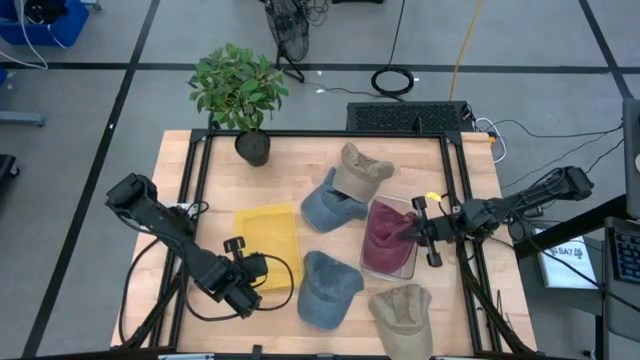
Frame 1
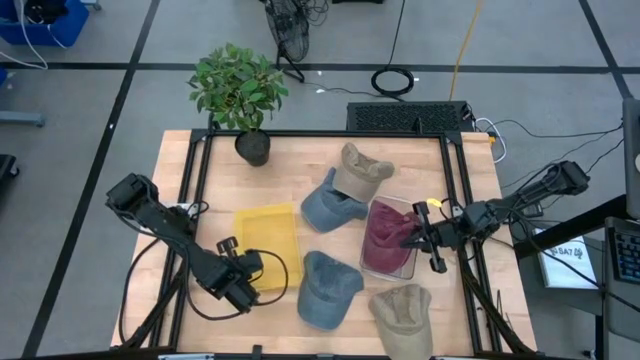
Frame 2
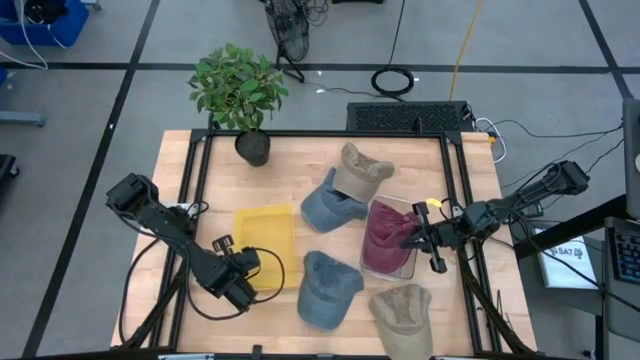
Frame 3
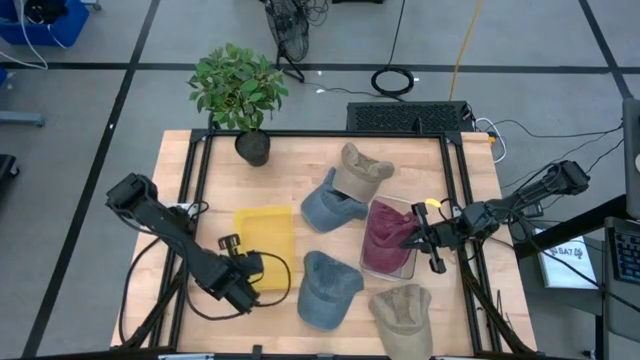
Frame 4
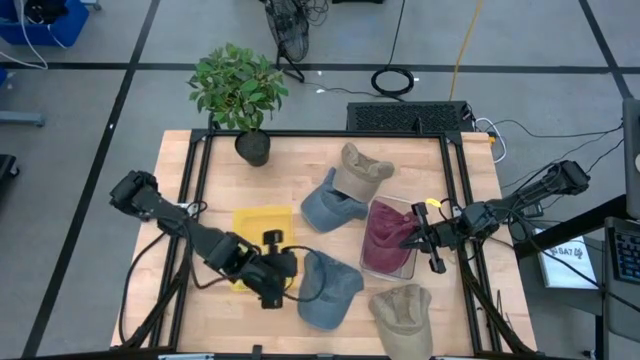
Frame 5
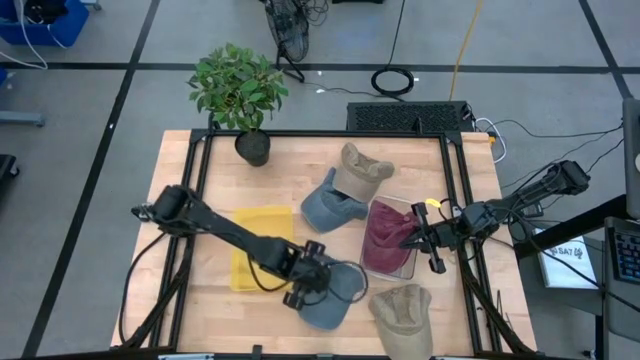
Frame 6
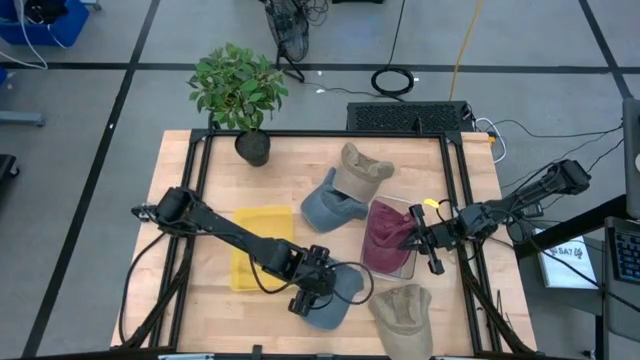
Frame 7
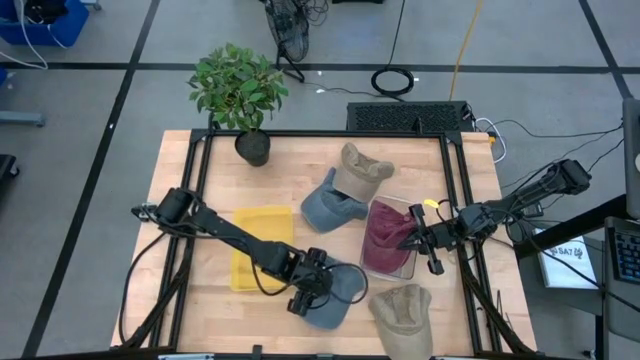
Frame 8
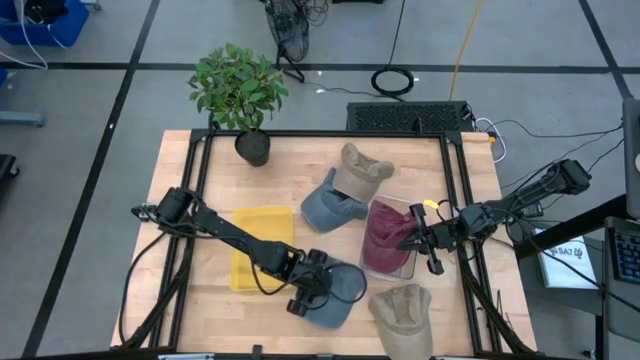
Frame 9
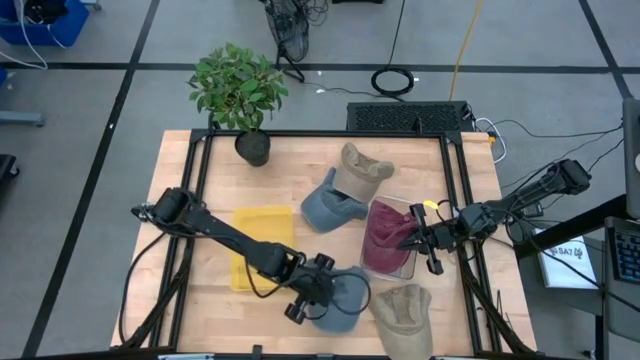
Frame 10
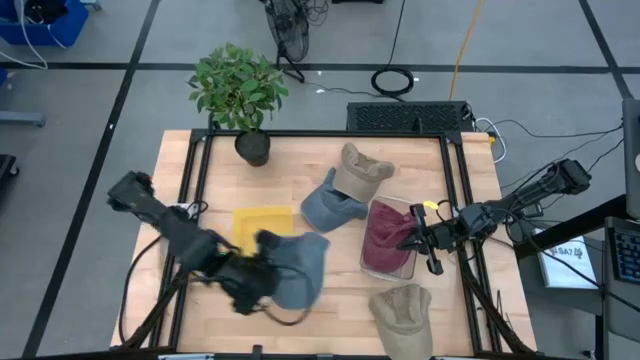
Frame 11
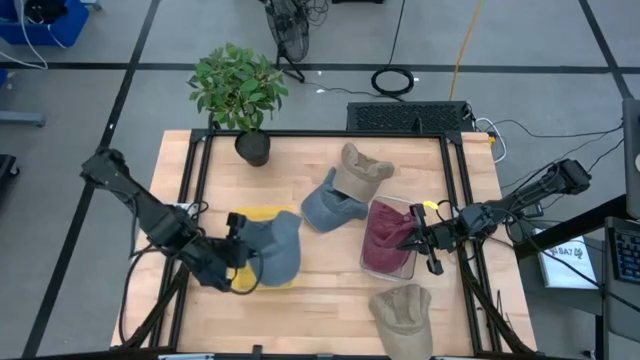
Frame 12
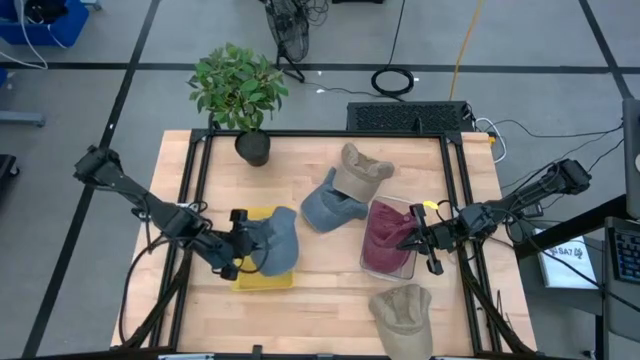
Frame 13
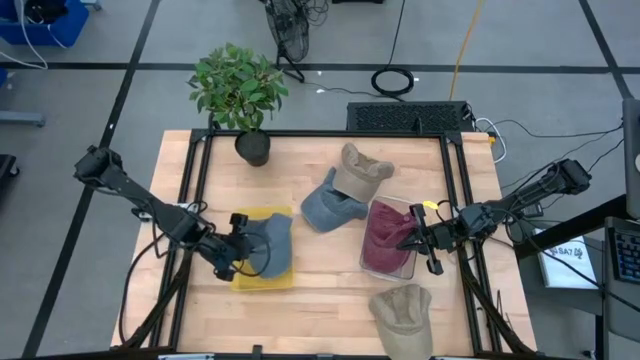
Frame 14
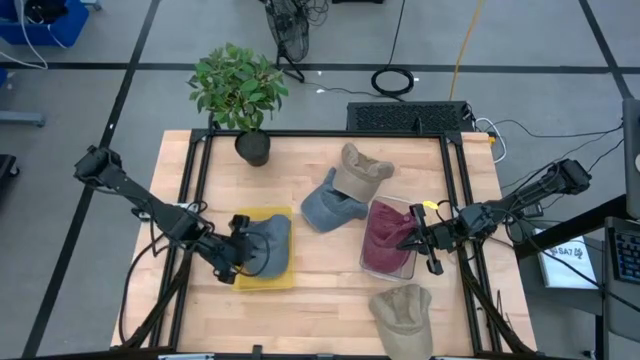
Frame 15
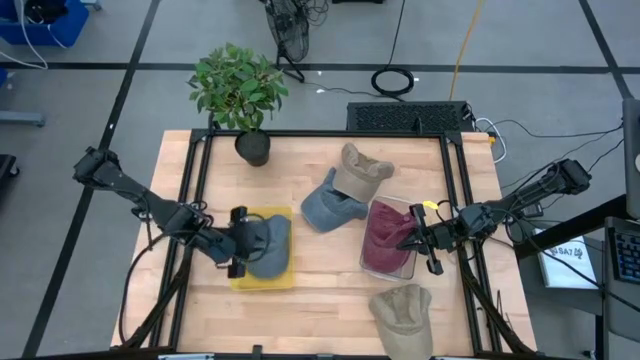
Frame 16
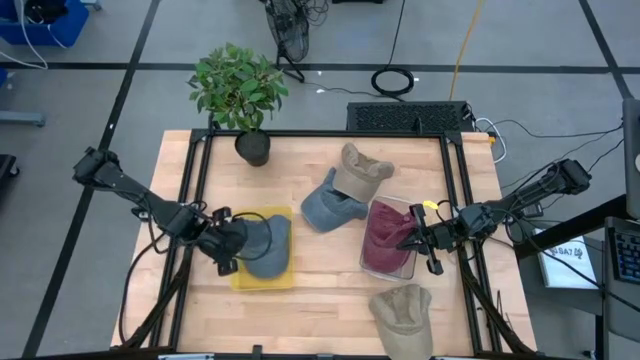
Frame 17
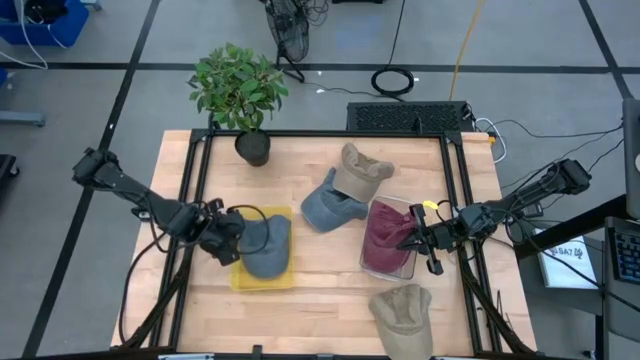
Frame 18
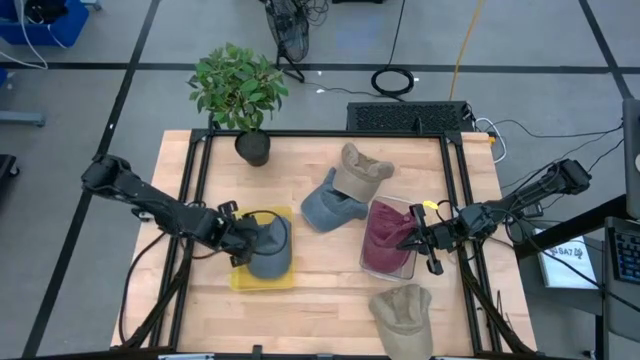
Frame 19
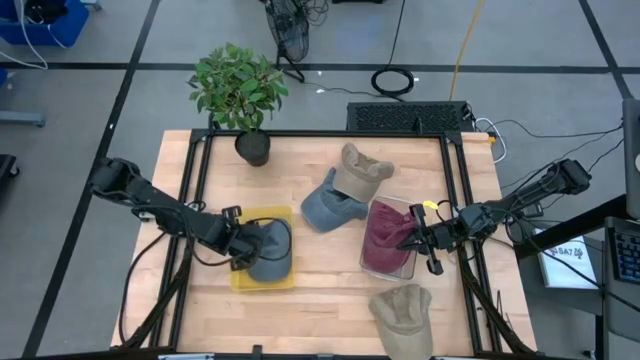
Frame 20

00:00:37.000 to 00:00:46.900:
Task: Pick and place caps into container
Put the bottom blue cap into the yellow container

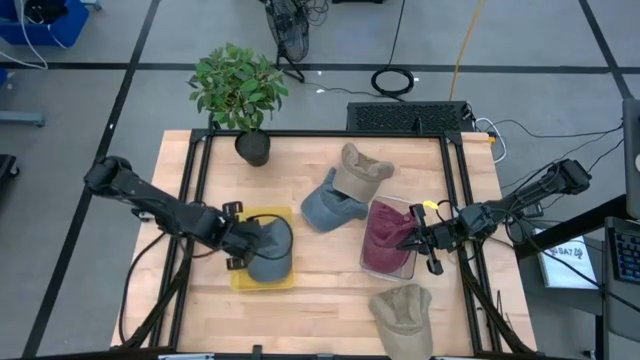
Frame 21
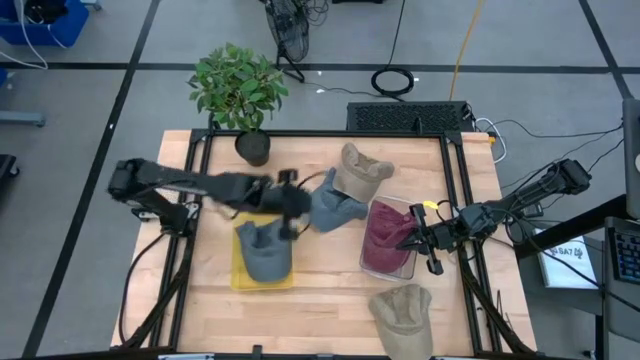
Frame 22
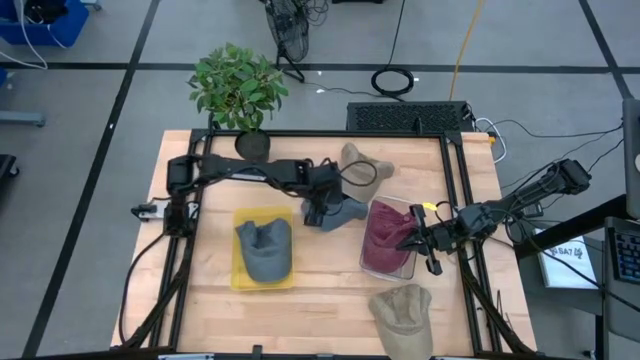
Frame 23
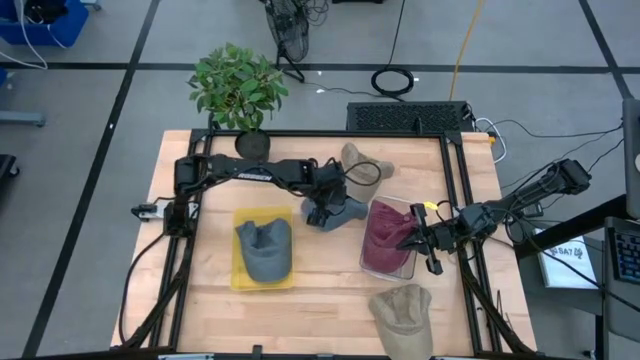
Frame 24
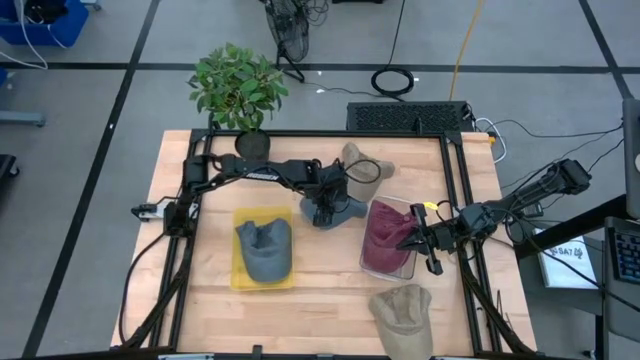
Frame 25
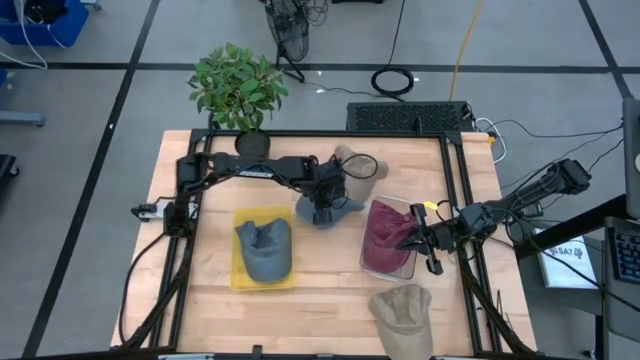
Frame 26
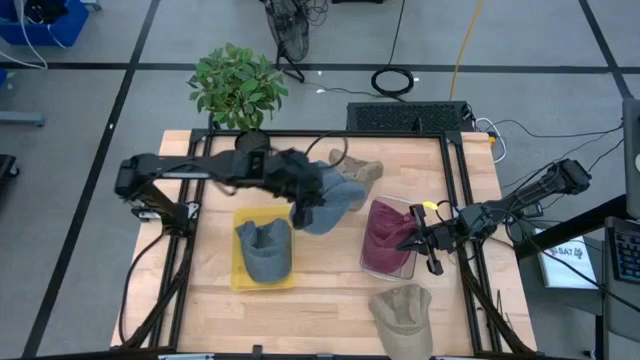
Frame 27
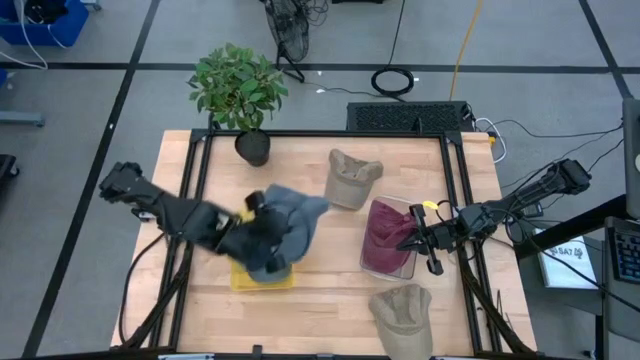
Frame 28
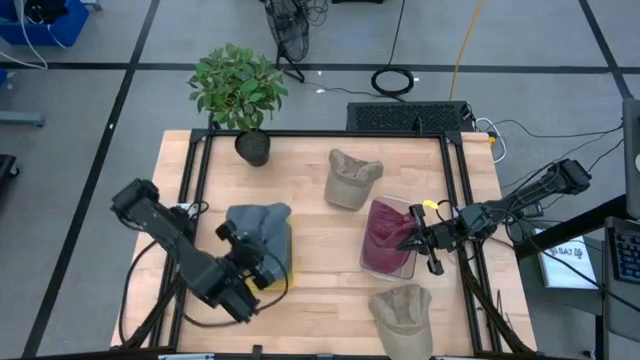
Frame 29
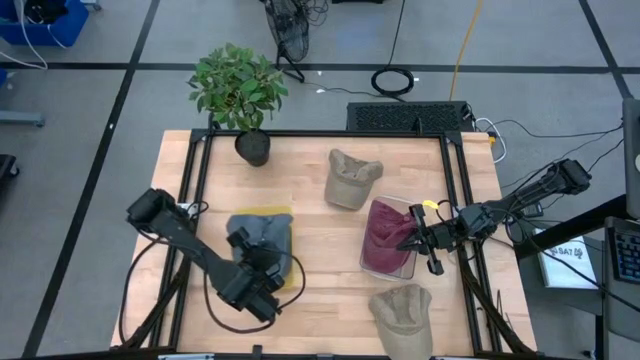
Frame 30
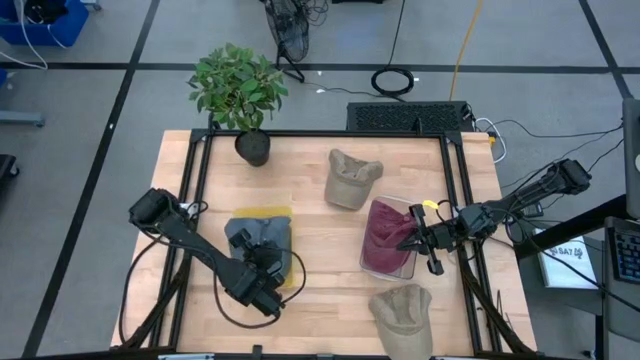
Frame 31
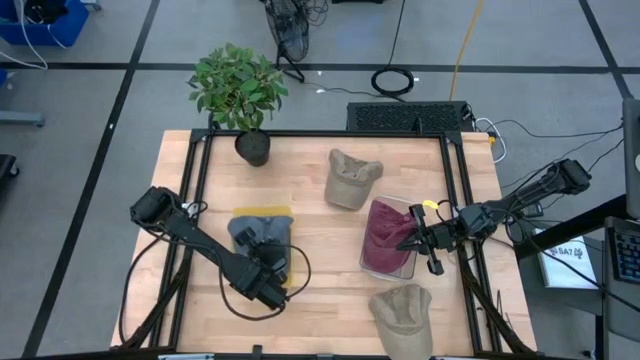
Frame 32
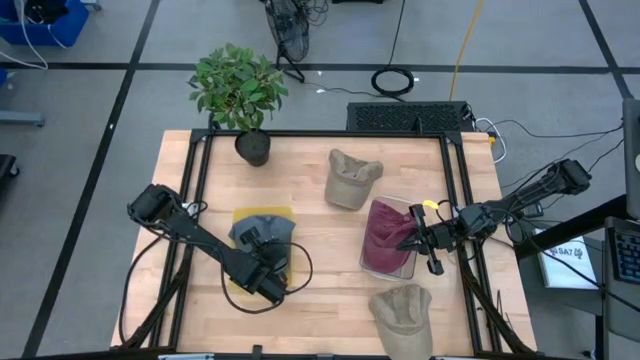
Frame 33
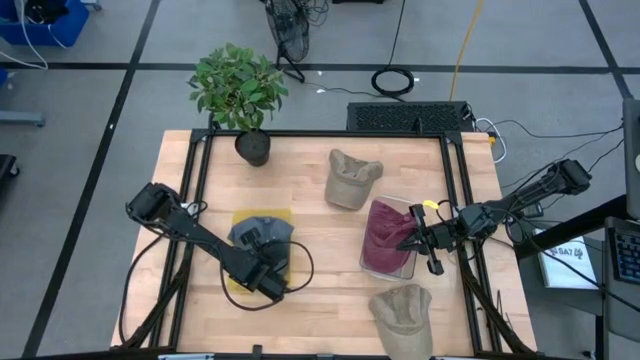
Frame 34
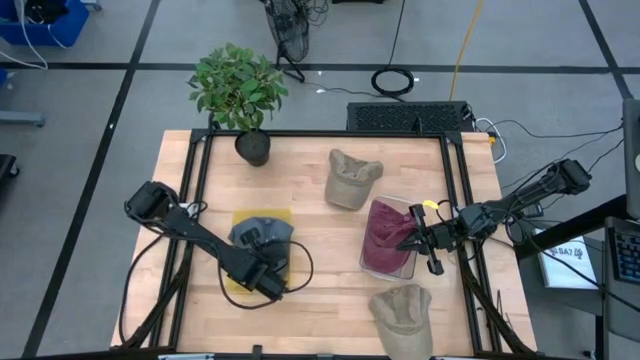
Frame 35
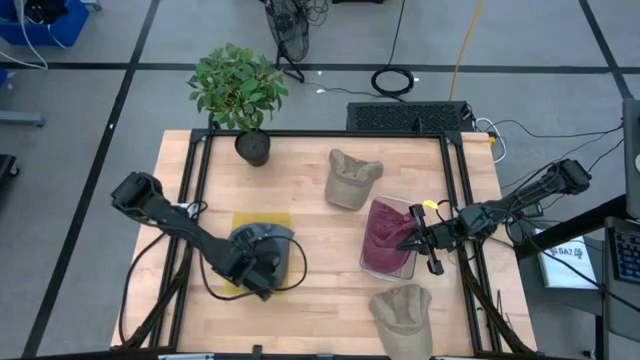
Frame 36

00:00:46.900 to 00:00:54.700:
Put the blue cap into the yellow container

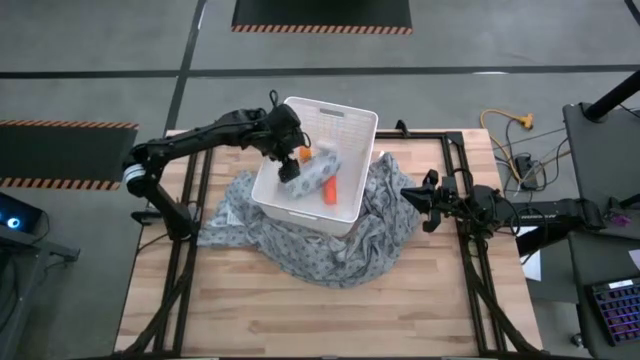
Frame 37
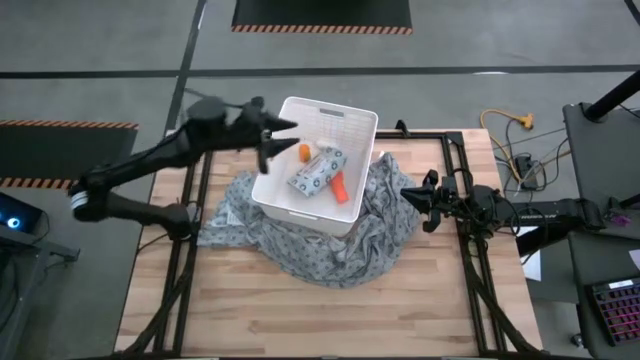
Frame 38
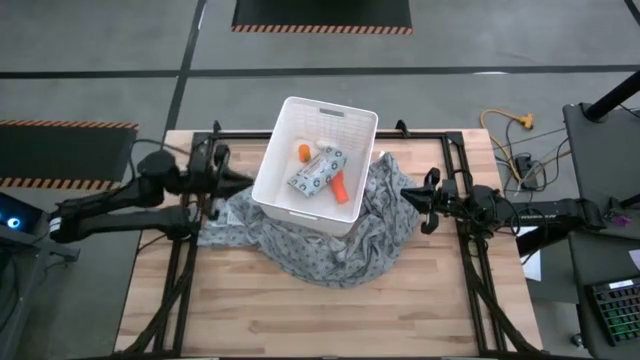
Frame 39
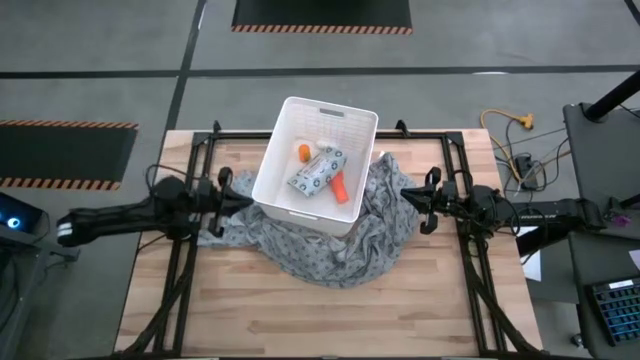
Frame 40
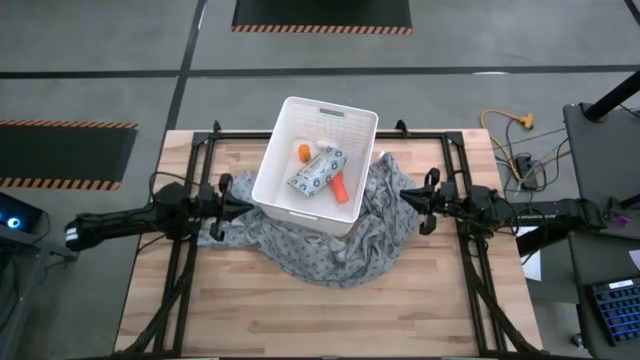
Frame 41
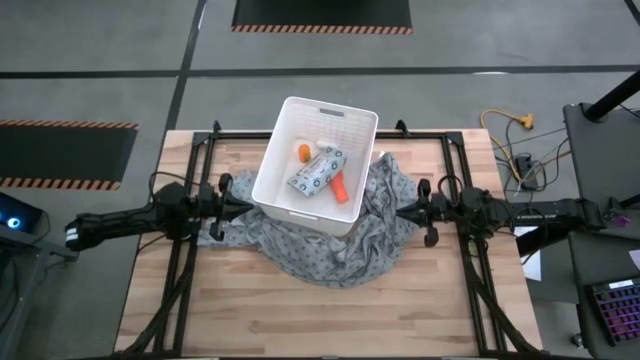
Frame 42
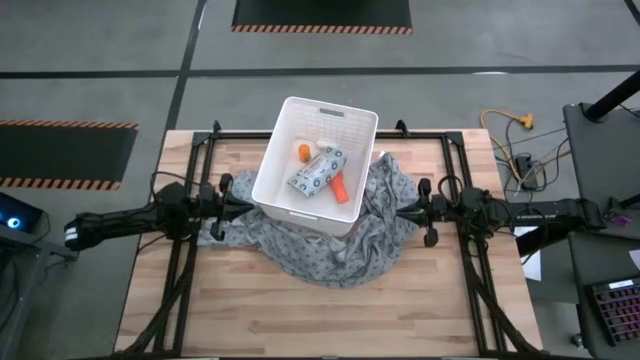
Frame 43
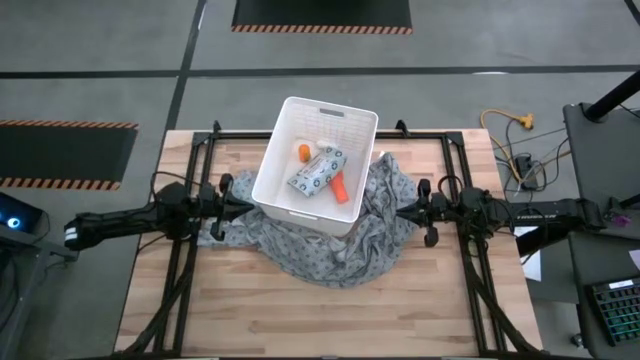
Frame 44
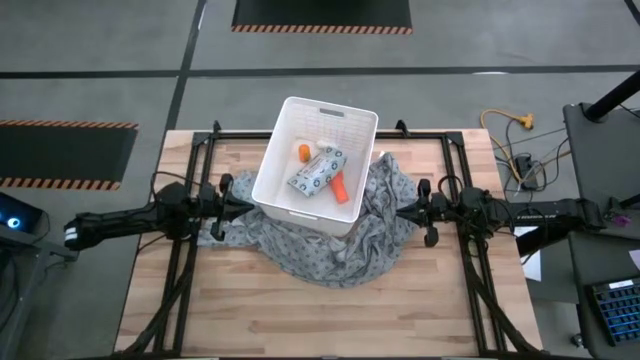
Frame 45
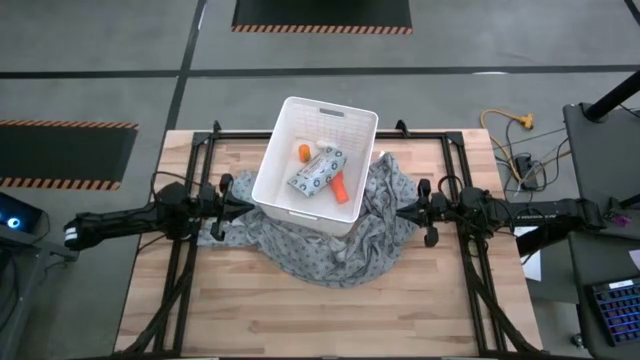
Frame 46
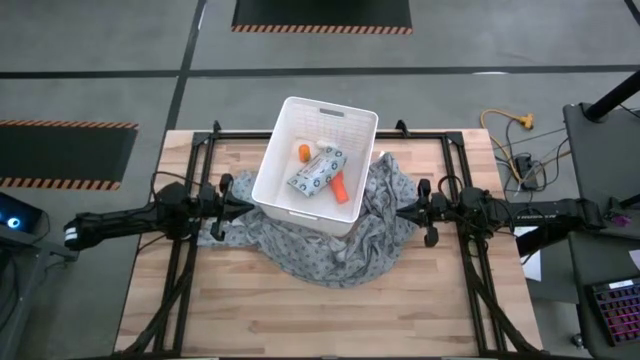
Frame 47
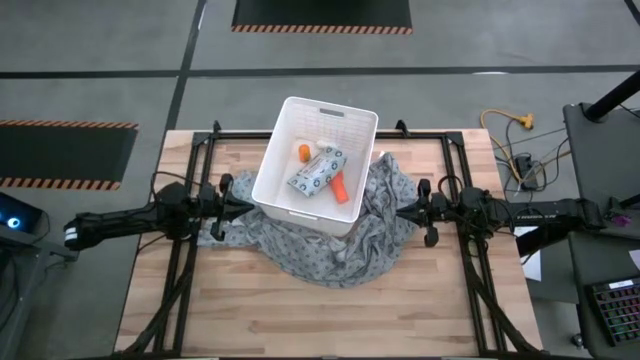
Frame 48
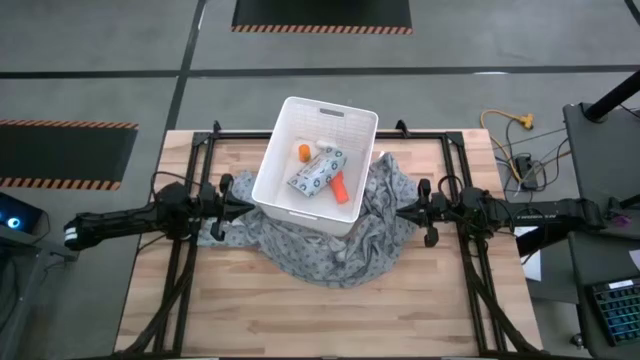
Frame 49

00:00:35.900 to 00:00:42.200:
Task: Pick & place medical supplies in basket/bin
Return to Home Position
